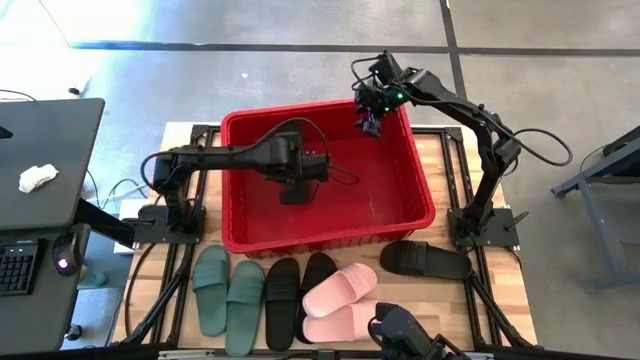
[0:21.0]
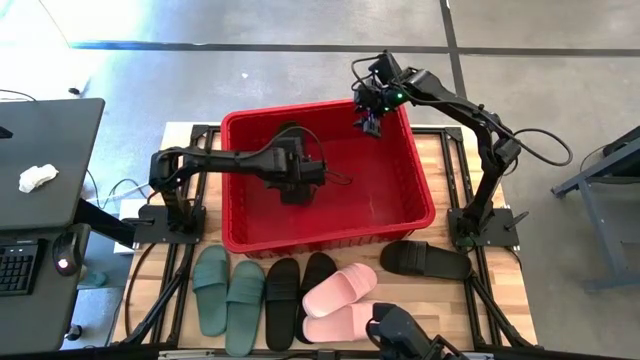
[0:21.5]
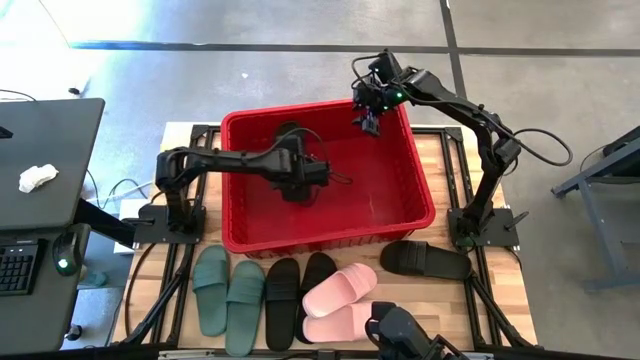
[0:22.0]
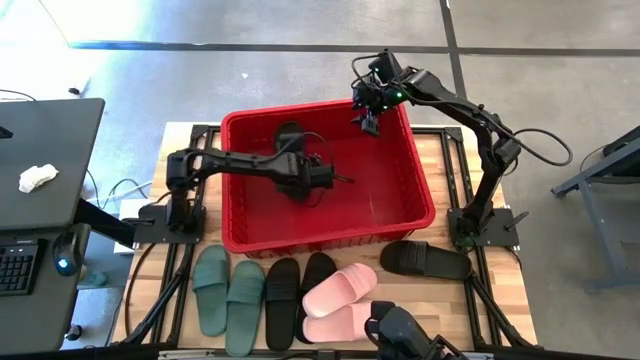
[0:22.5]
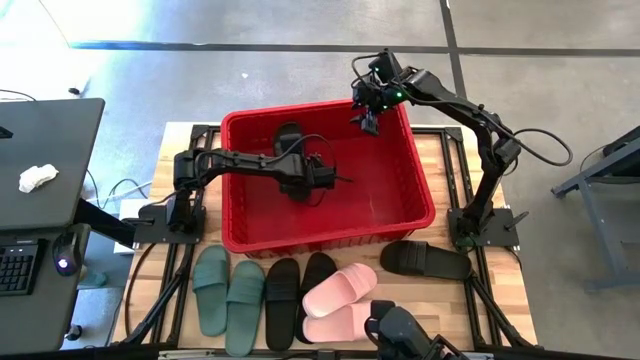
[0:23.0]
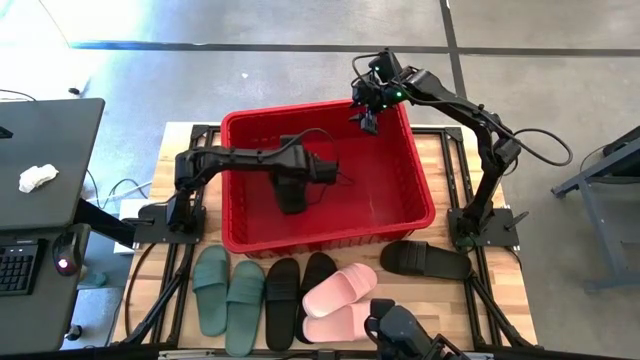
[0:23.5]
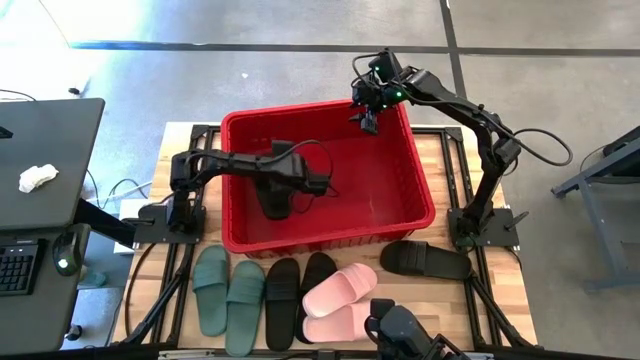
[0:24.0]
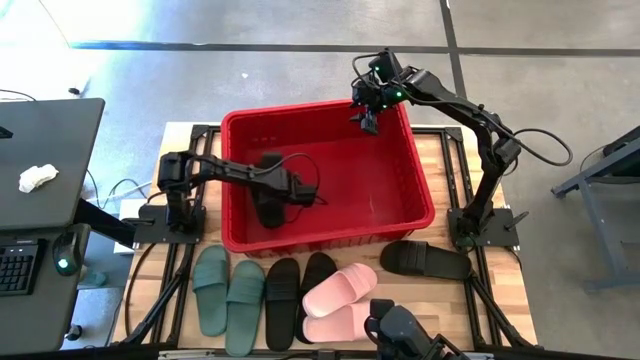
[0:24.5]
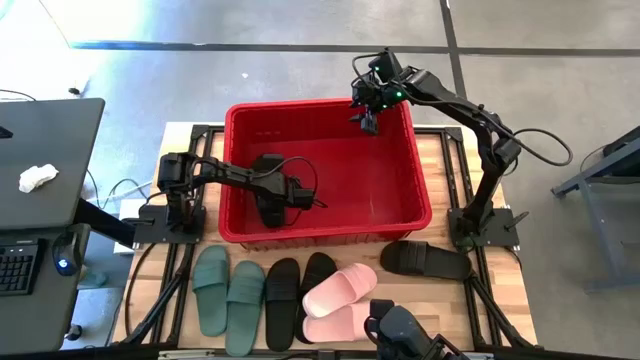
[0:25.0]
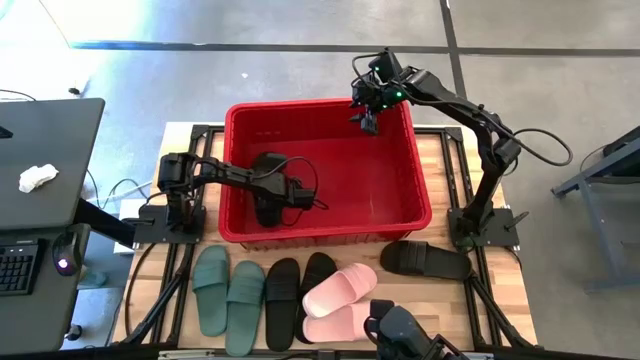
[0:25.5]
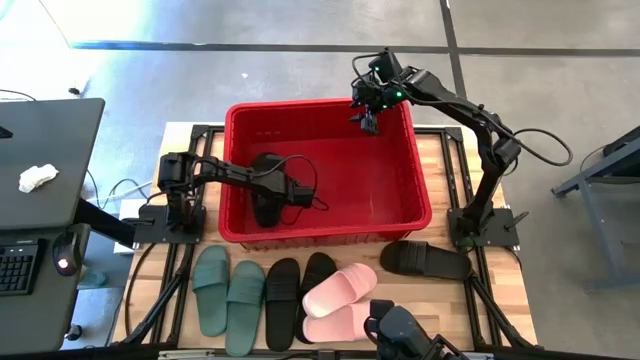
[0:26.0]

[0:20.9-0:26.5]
Task: Pick and place slides into bin
Adjust the black slipper in the red bin

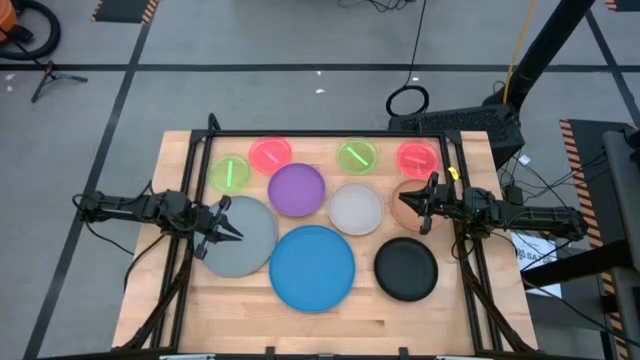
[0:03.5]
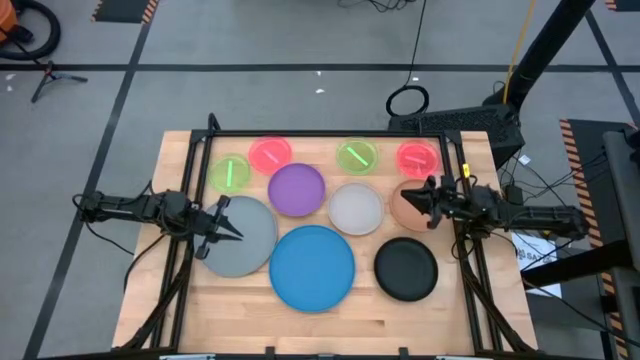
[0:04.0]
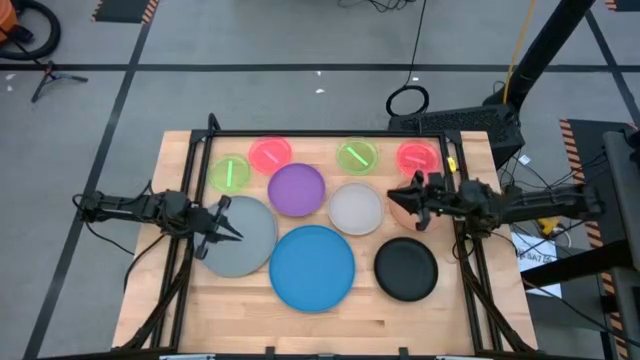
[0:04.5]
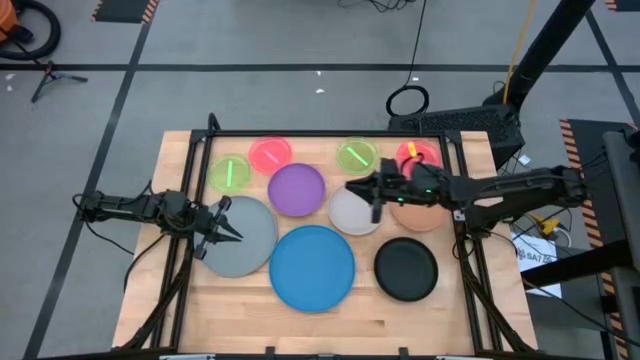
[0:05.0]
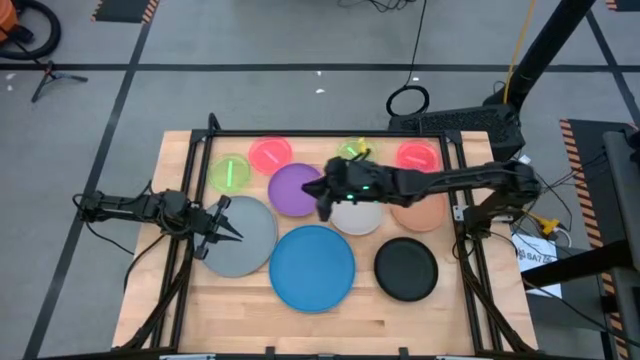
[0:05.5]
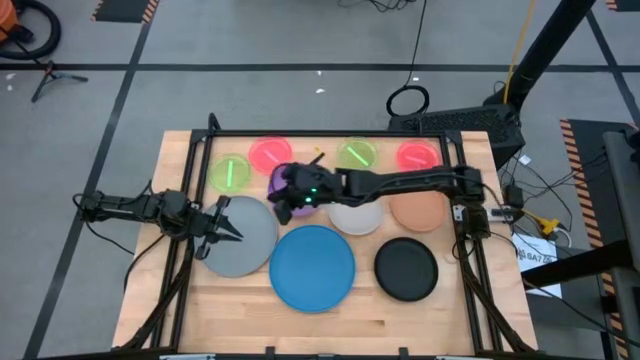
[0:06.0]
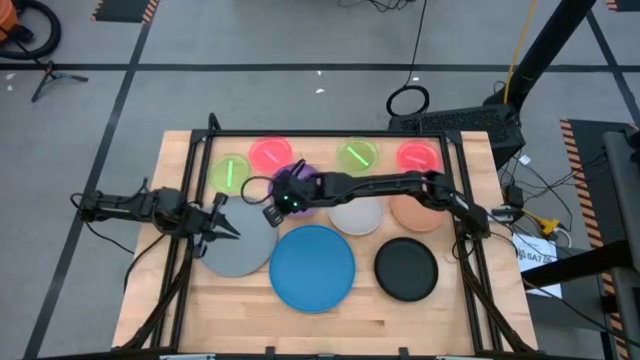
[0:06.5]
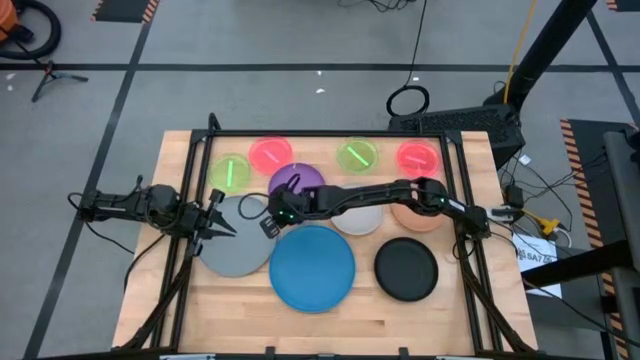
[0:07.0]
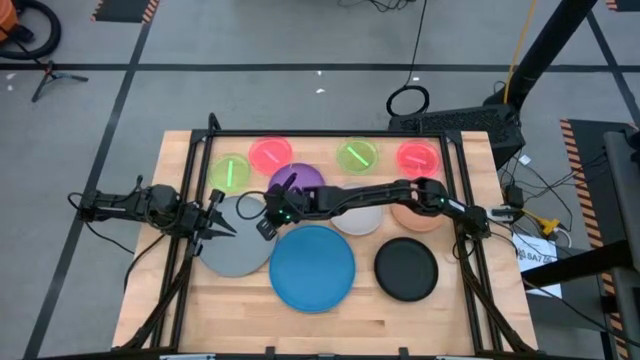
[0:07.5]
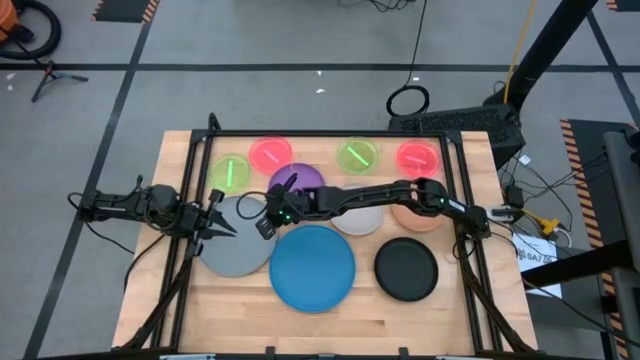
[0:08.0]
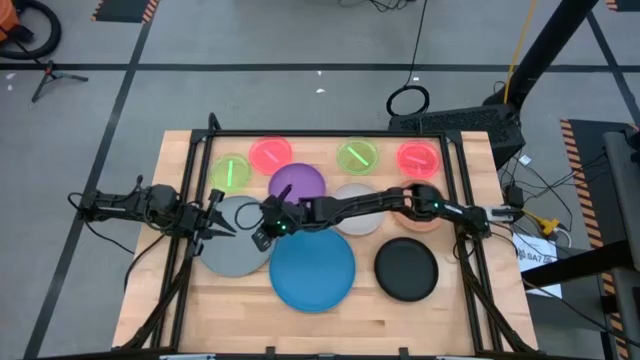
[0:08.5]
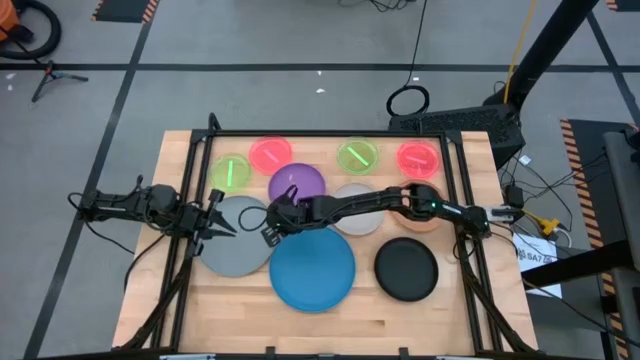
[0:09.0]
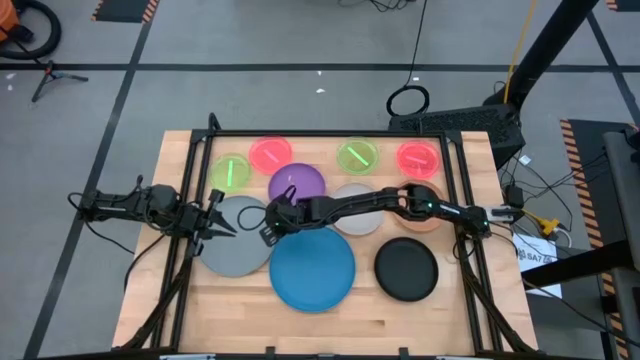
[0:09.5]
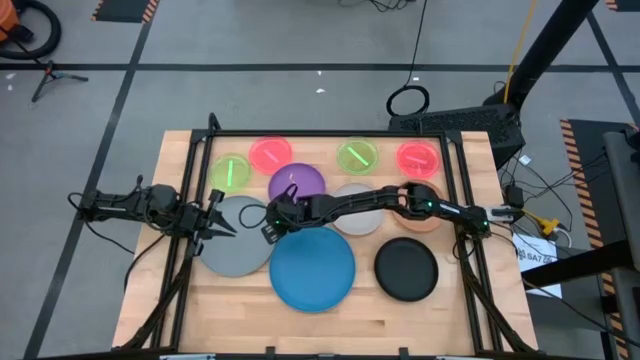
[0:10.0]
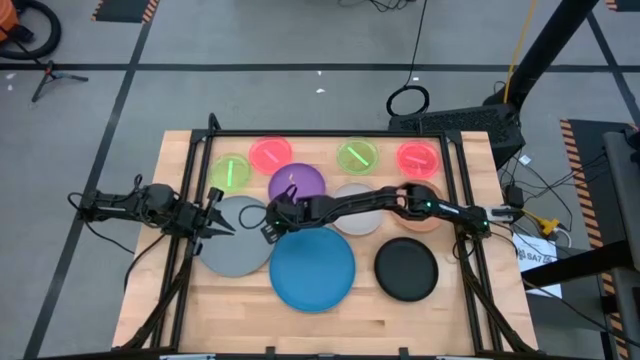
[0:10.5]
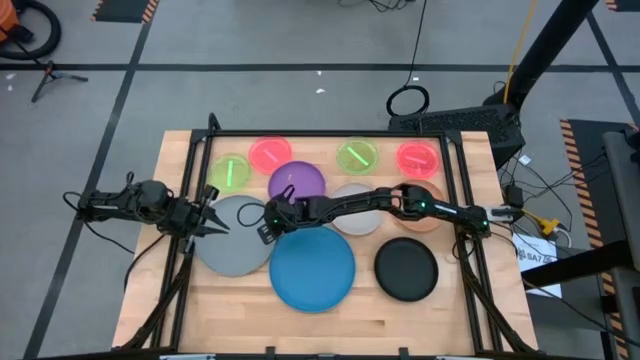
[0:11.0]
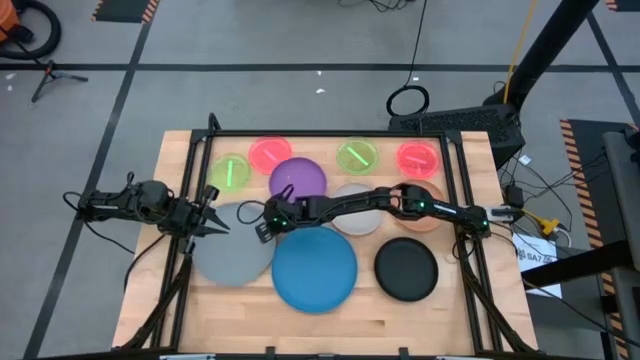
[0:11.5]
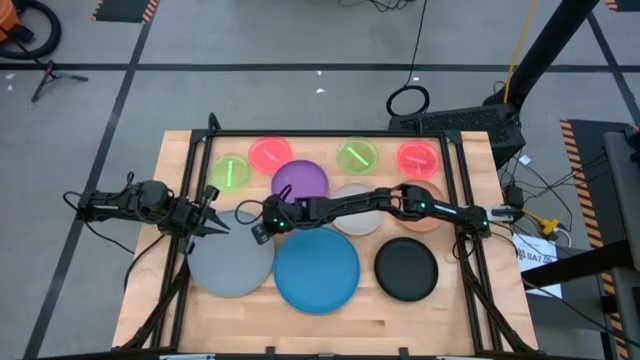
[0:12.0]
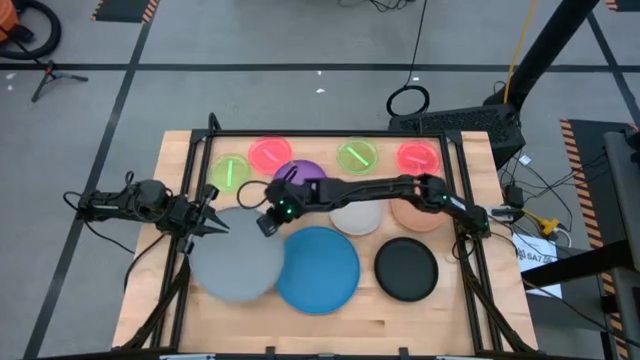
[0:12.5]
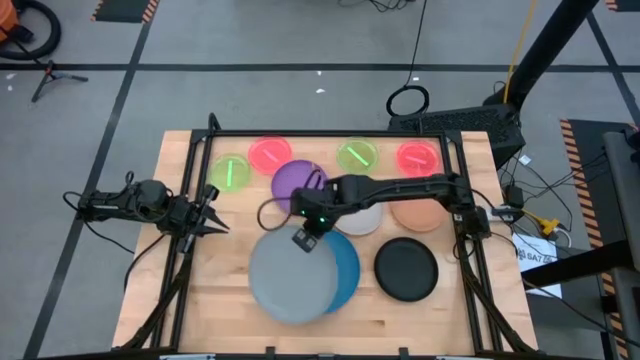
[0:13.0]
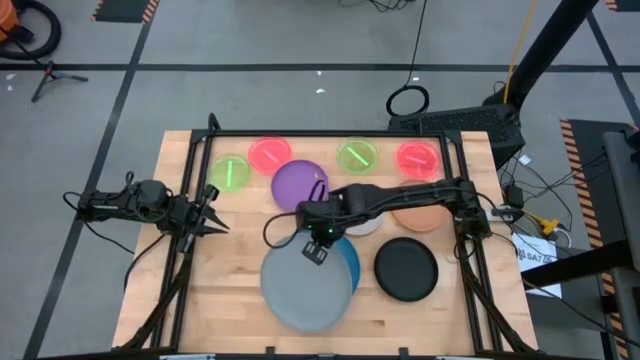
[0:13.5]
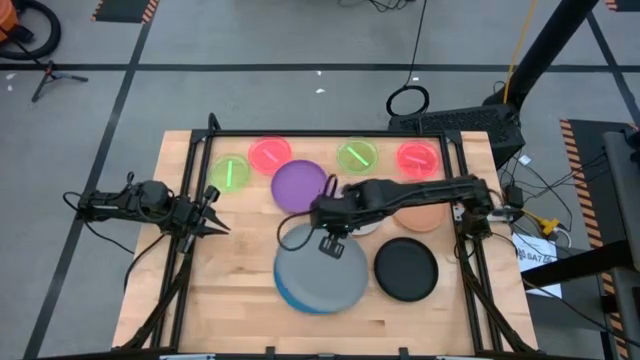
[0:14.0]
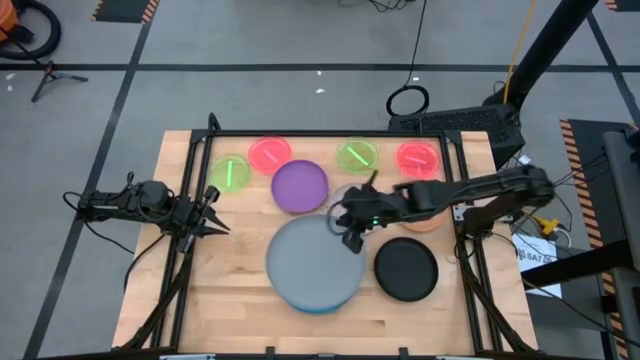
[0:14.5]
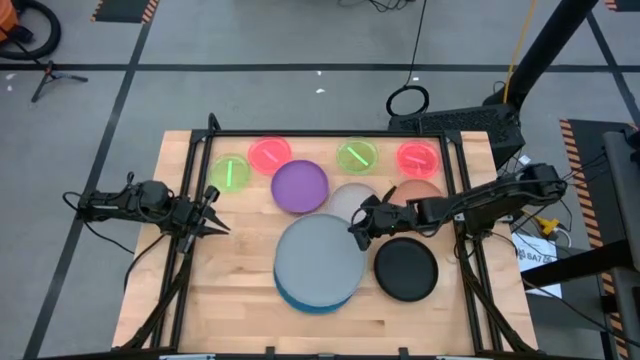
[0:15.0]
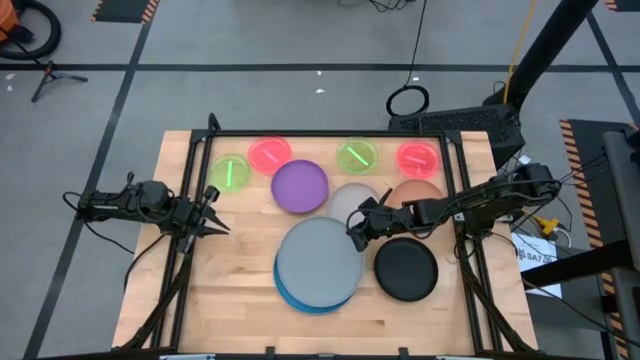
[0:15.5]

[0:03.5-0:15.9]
Task: Stack plastic plates
Stack the gray plate on top of the blue plate
